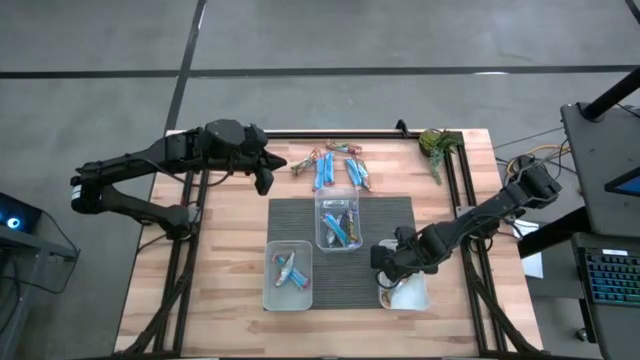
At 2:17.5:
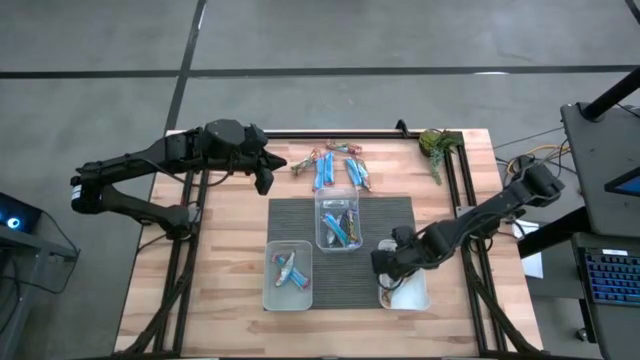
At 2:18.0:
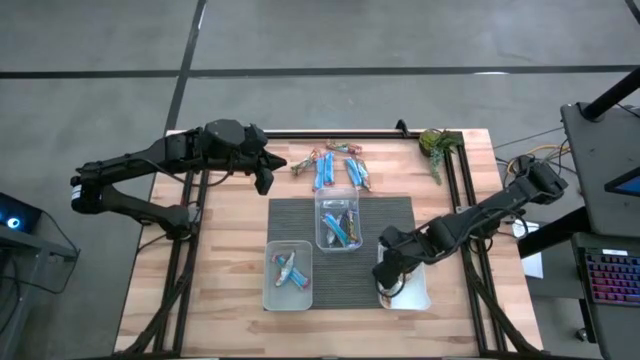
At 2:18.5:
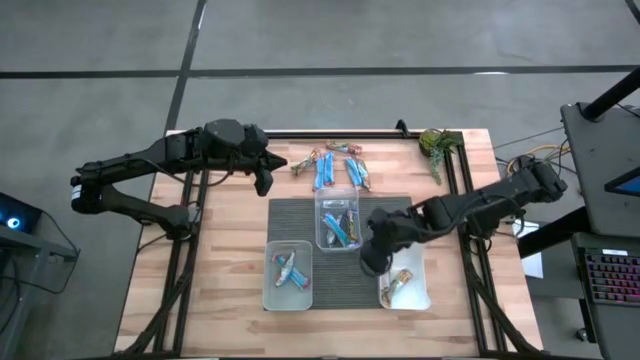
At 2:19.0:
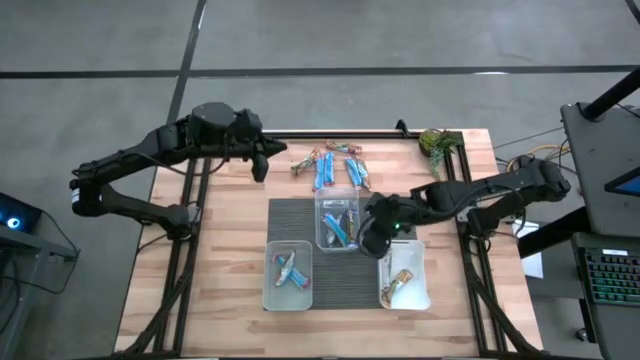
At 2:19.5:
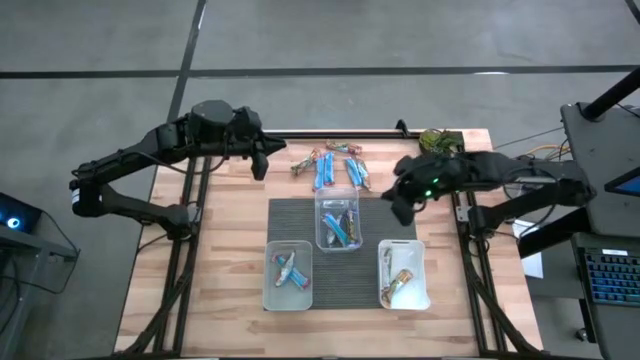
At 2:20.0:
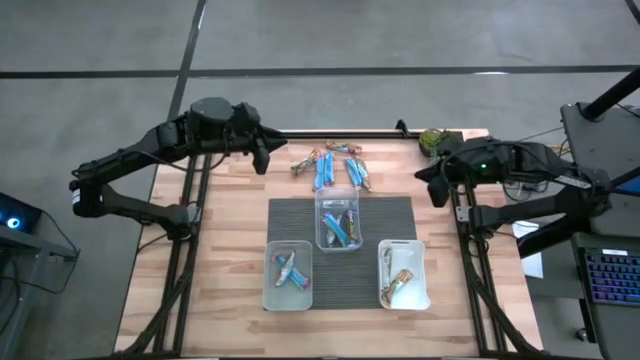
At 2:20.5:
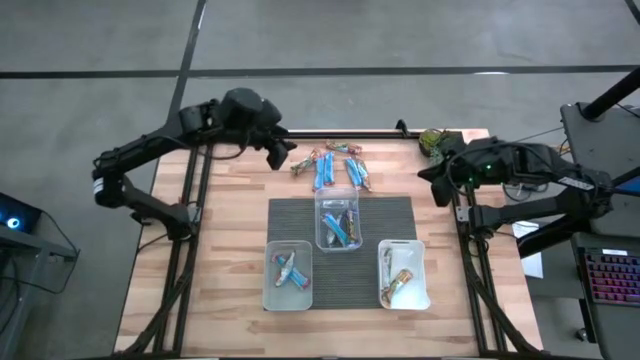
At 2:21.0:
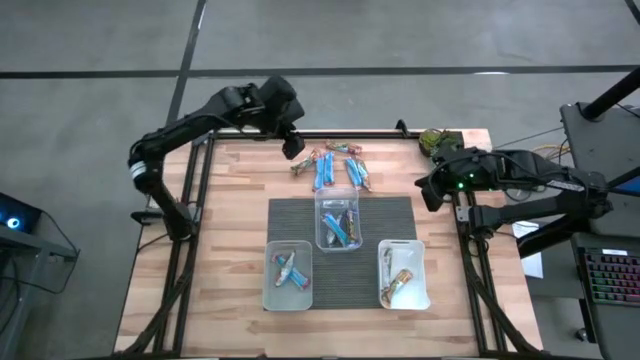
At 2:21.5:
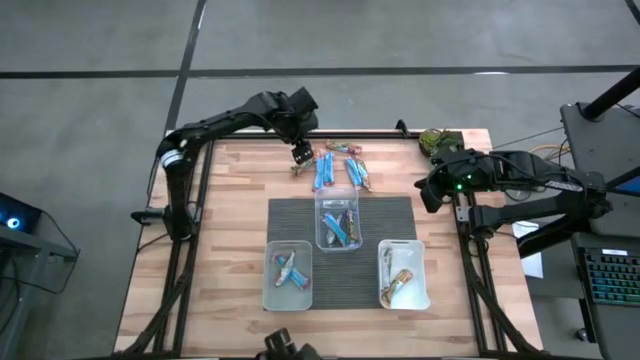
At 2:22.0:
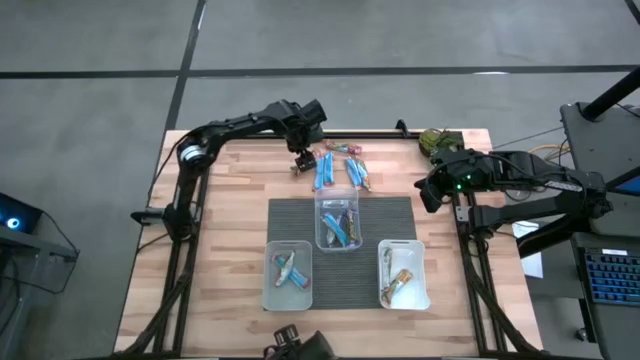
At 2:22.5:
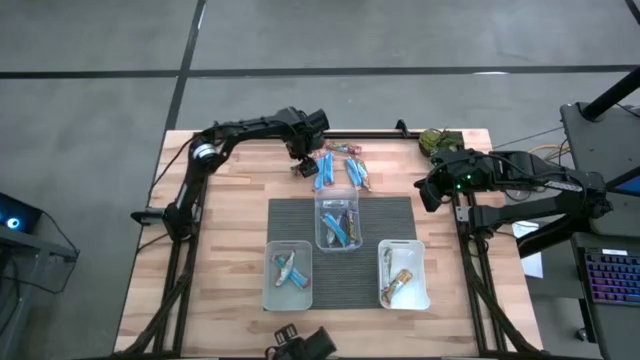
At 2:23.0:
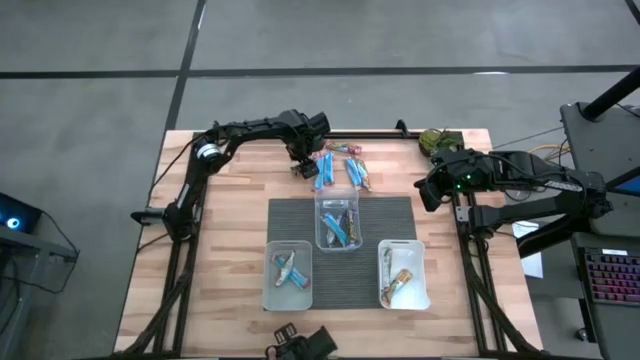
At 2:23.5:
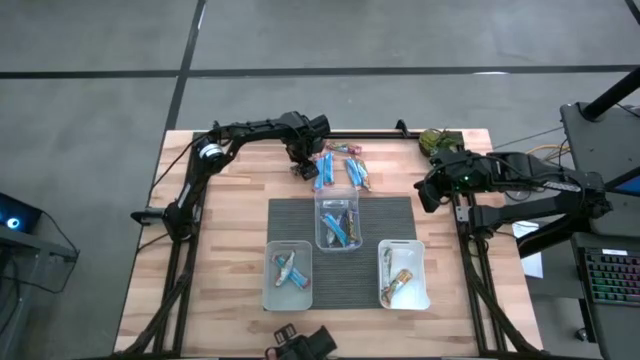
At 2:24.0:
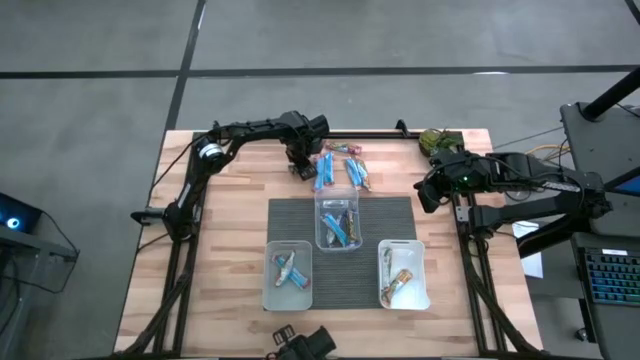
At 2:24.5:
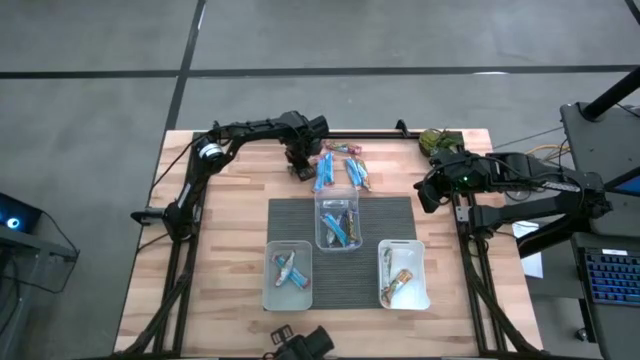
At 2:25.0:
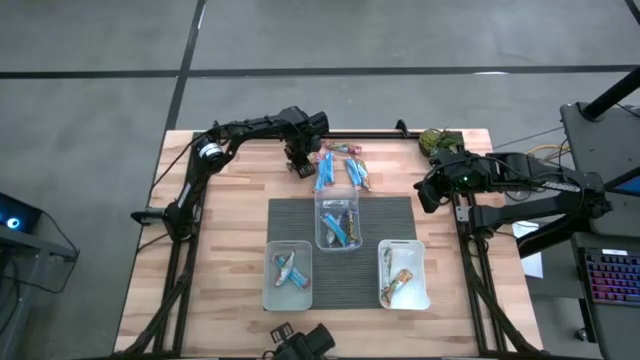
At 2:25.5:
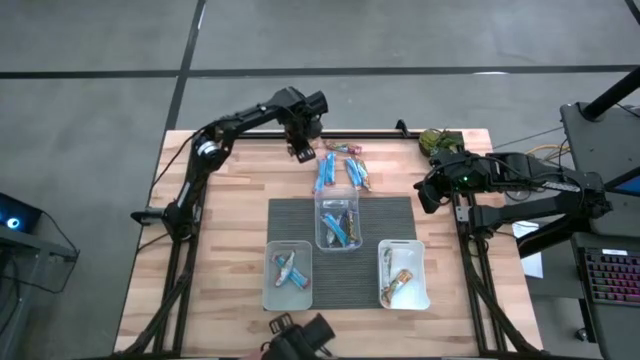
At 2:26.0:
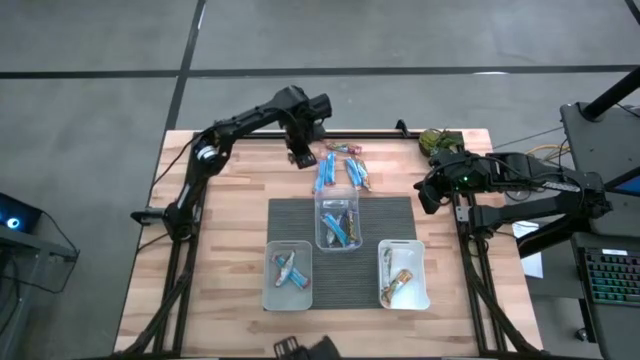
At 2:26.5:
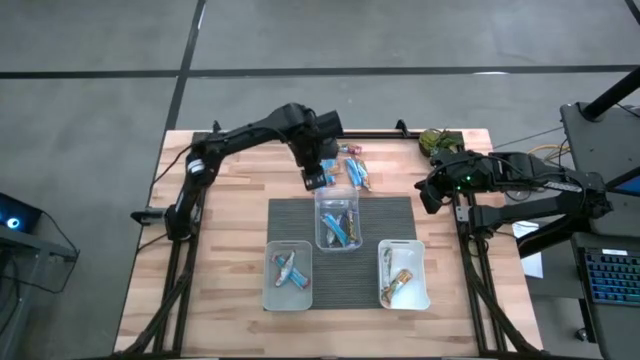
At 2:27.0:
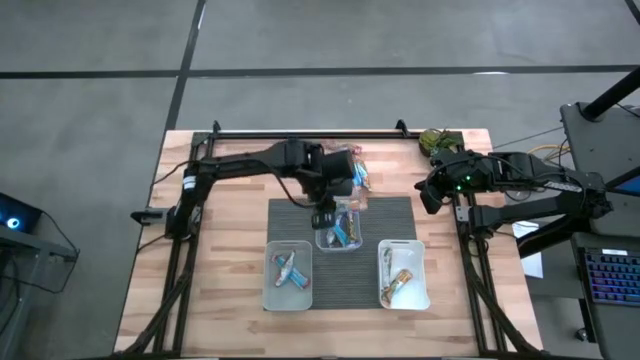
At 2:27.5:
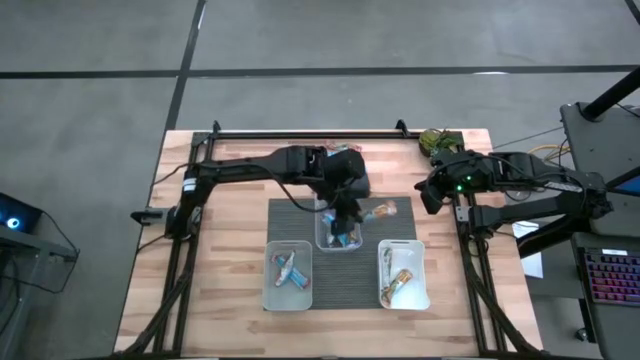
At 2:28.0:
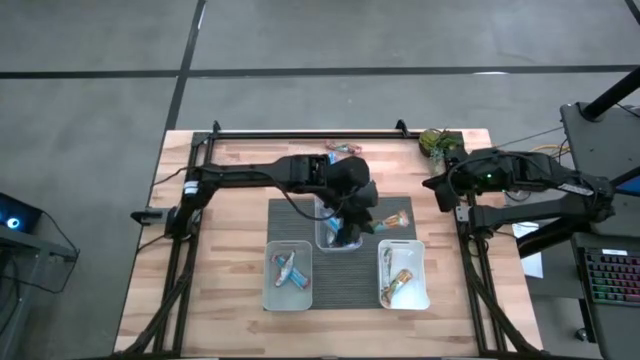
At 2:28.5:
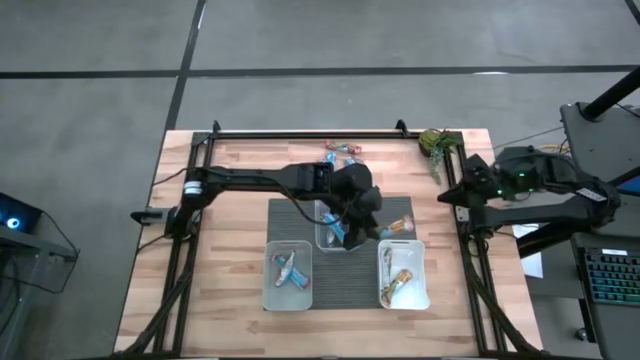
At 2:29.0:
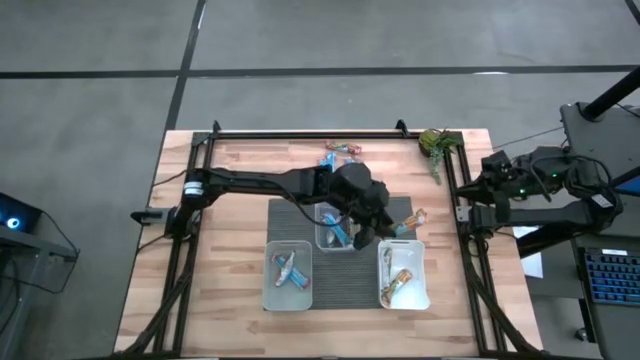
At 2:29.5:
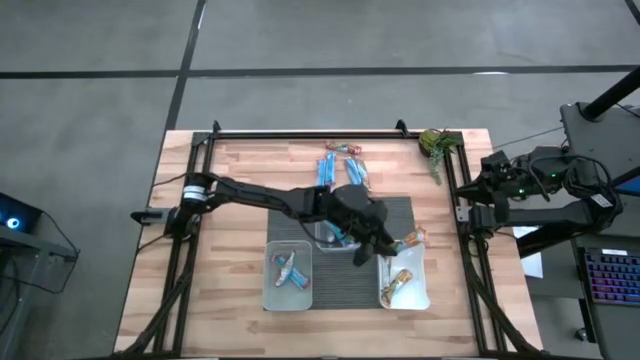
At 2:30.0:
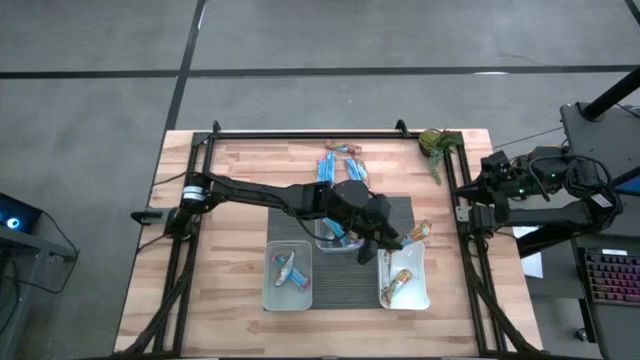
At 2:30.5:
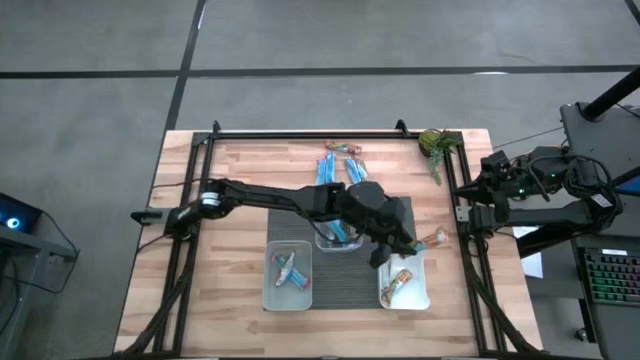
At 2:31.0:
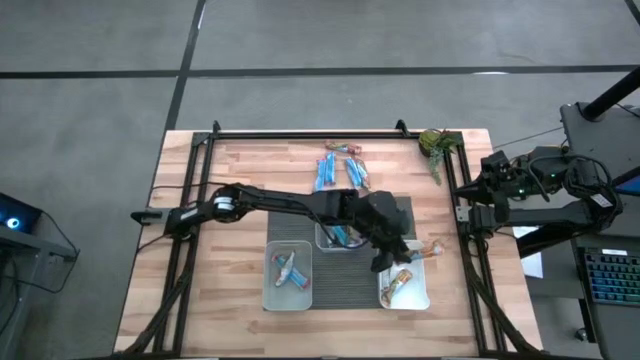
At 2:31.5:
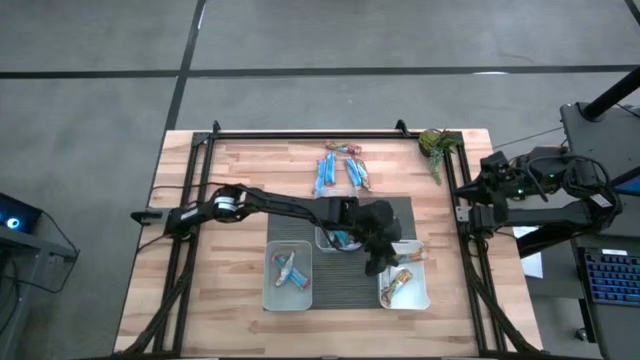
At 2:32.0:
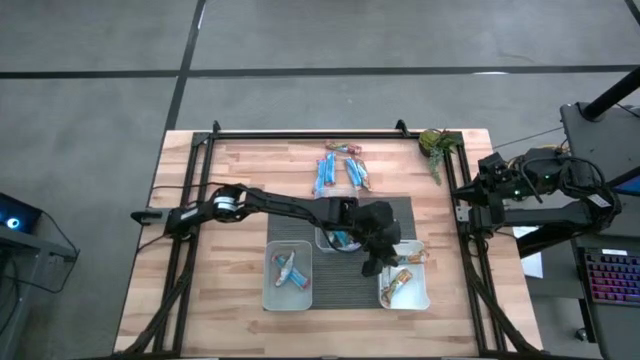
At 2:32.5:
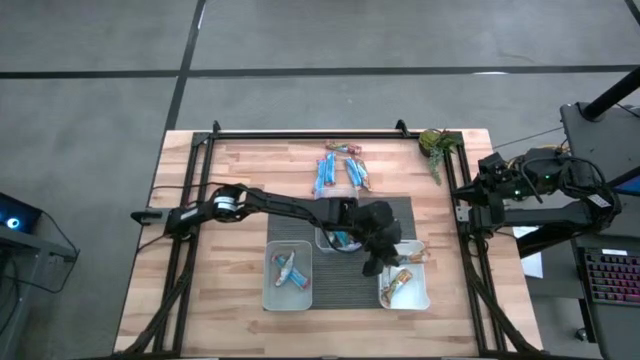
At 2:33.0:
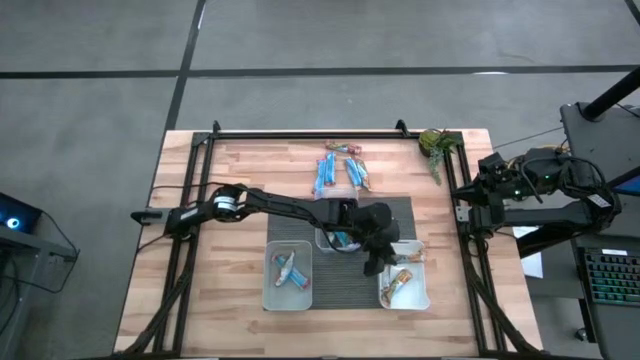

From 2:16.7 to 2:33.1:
Task: Pick and place Granola Bars by type
Put the orange granola bar into the white bin

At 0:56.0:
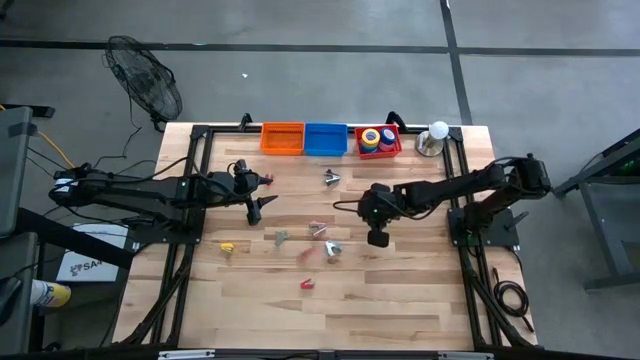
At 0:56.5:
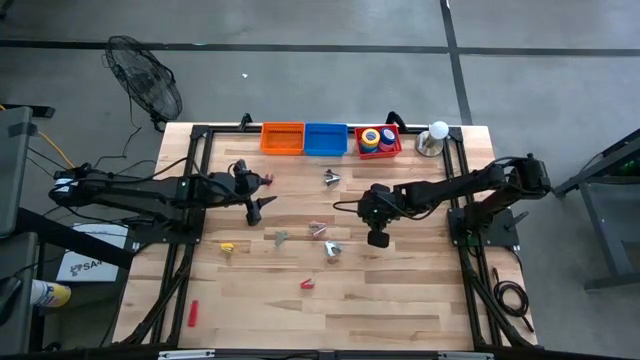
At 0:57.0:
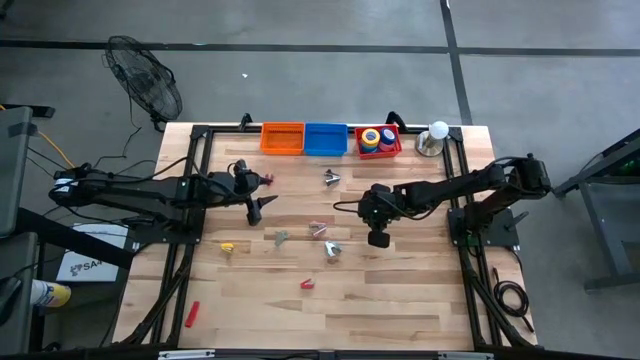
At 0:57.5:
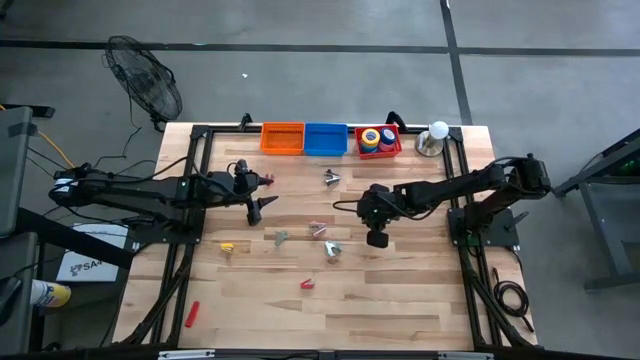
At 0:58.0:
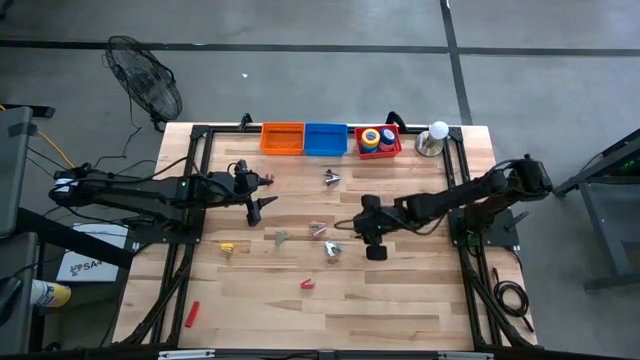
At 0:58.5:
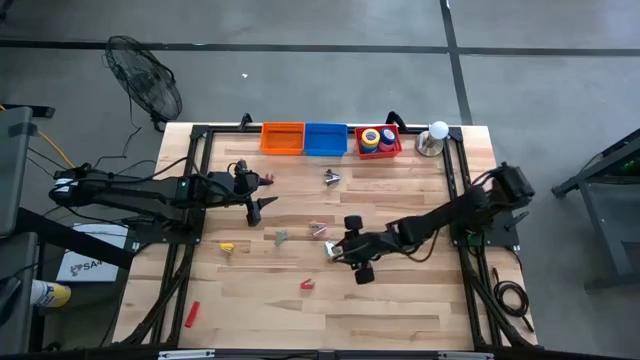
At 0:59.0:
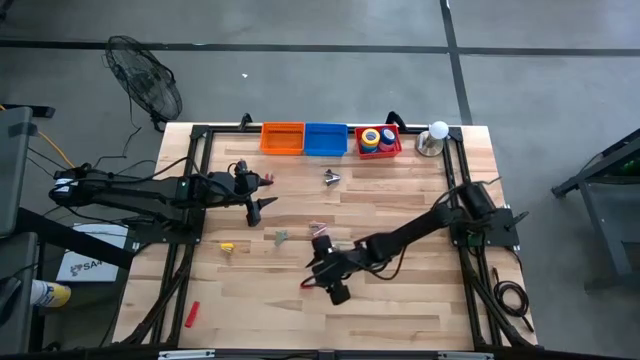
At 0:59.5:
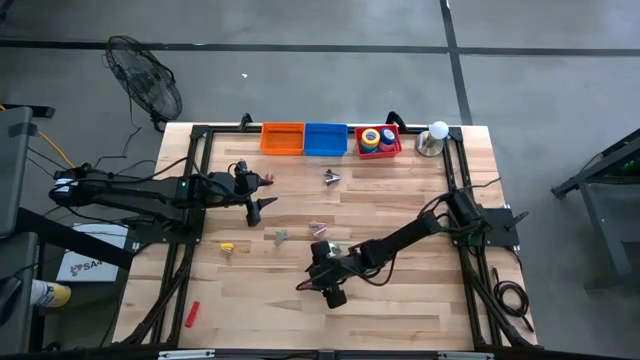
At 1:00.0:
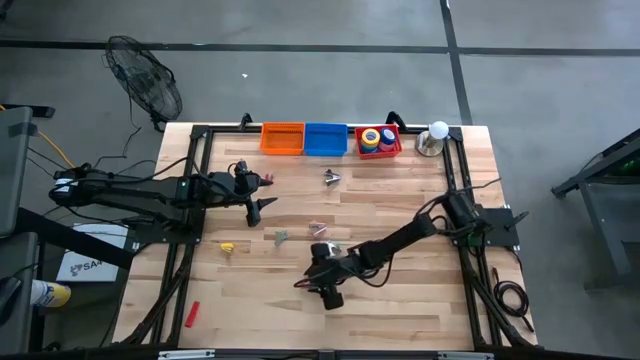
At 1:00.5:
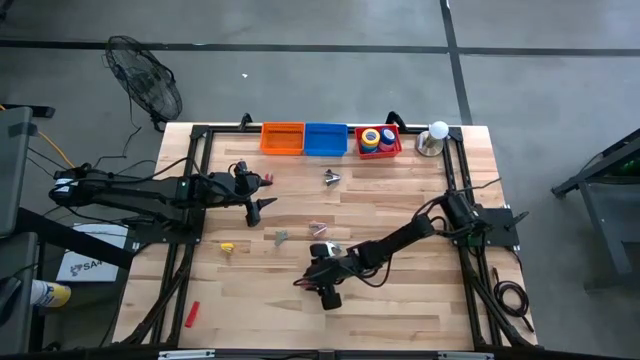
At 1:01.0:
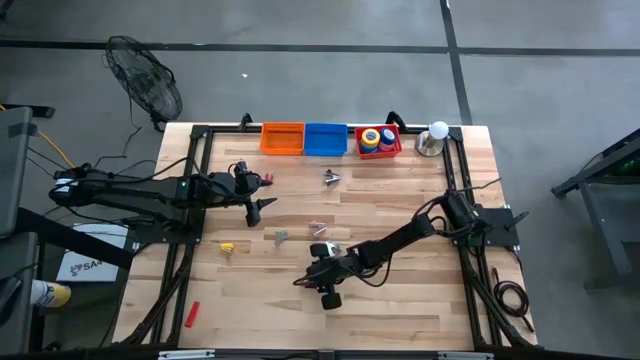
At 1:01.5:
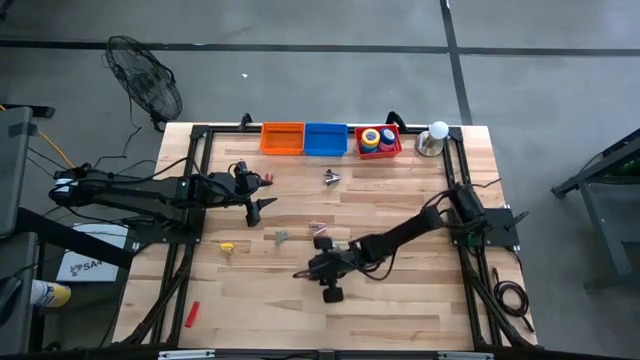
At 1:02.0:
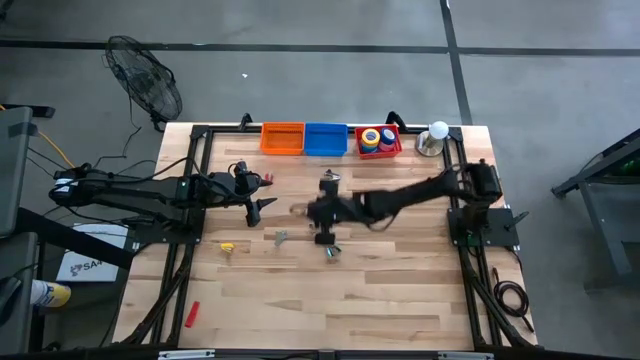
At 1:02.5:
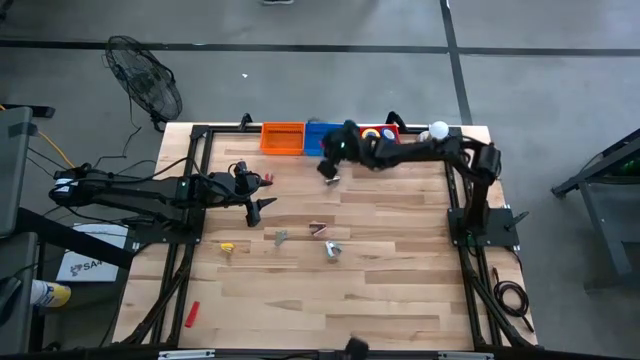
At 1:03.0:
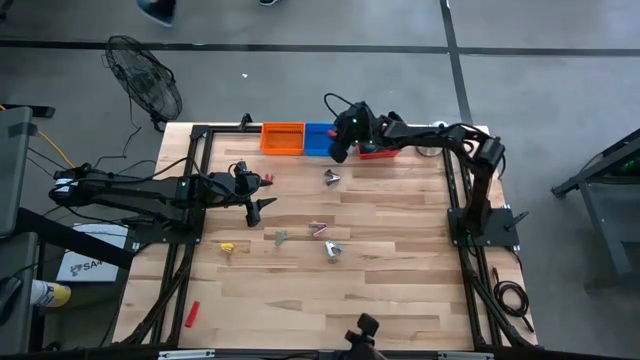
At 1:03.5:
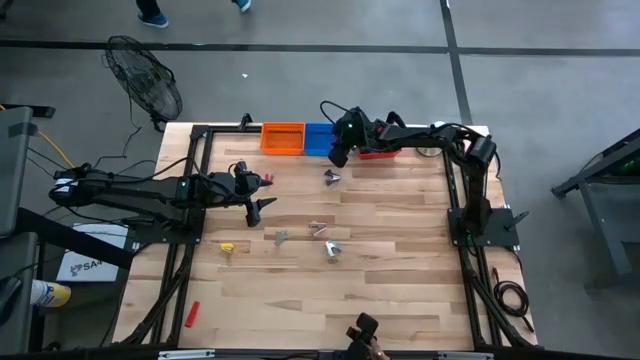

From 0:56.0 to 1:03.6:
Task: Pick and place Stapler, Stapler remover, tape
Put the red stapler into the blue bin
